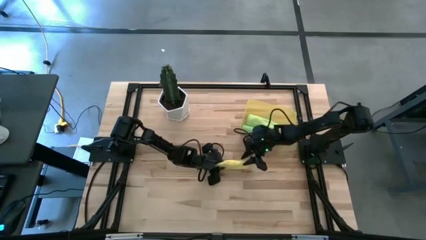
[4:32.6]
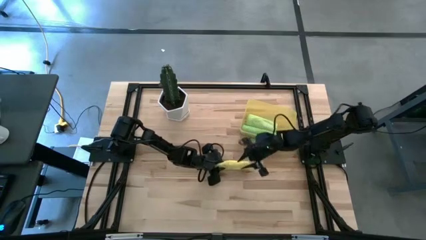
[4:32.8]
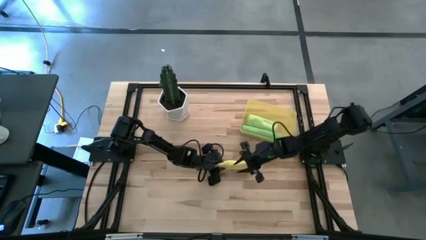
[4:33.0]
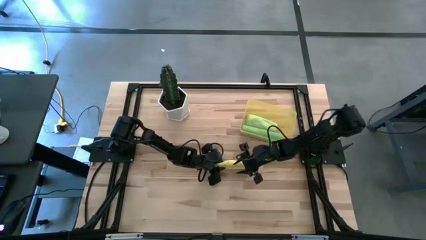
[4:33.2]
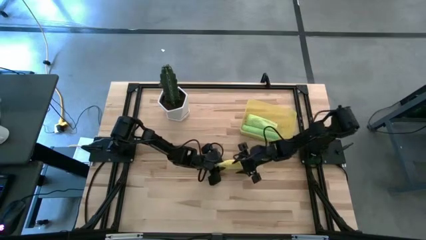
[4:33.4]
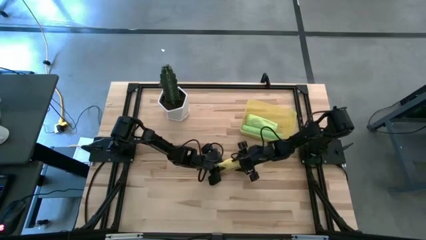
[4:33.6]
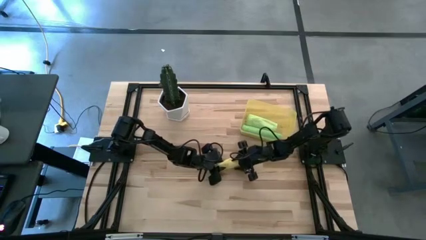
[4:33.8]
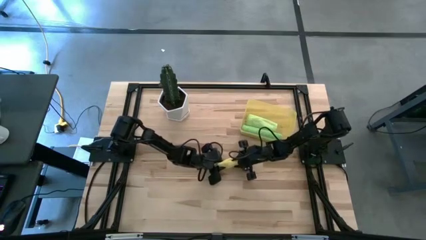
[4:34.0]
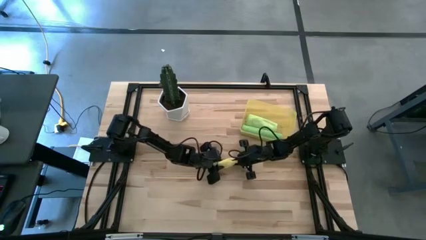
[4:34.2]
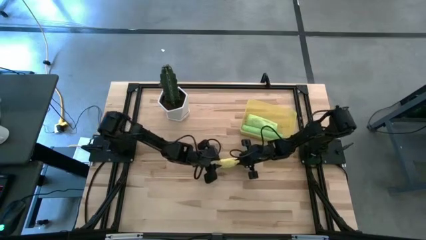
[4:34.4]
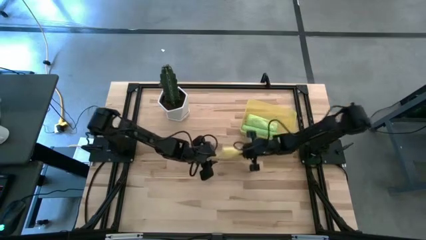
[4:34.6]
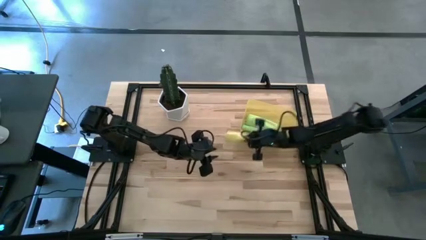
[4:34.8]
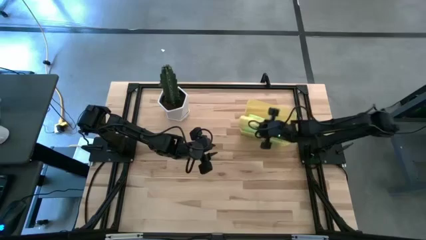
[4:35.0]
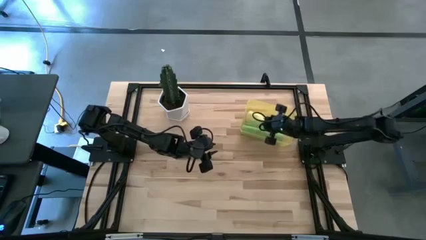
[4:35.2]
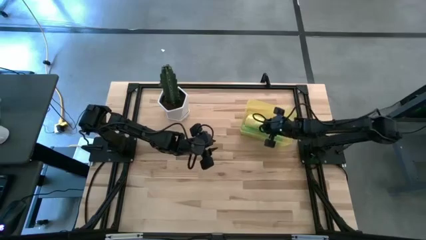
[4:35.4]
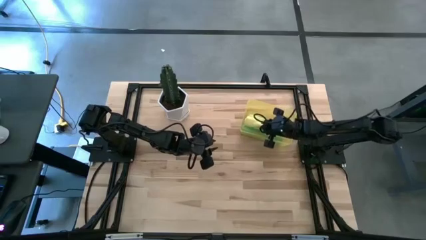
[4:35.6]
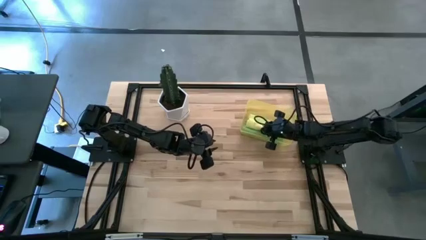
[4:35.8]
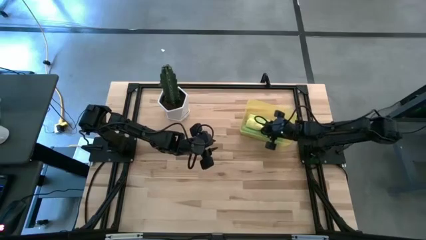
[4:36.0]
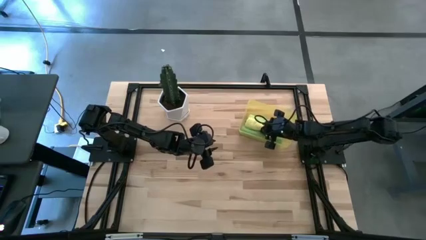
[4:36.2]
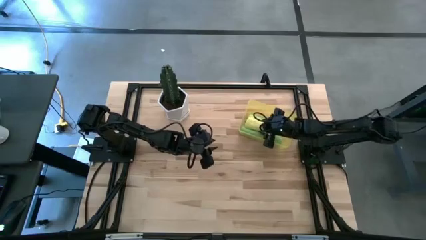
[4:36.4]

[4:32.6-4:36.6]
Task: Roll microfiber towels into tight, uniform cylinder then place into a basket
Put the yellow microfiber cloth into the yellow bin

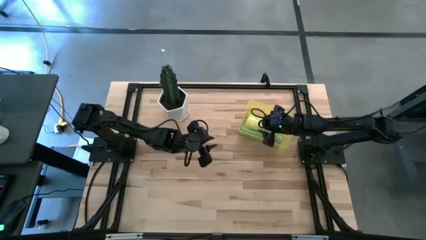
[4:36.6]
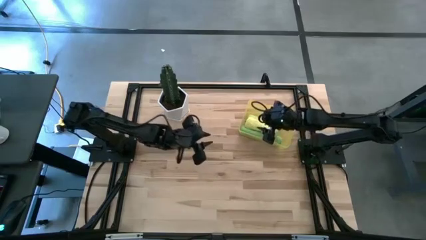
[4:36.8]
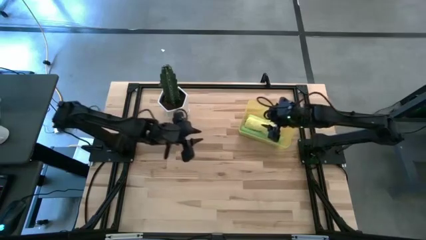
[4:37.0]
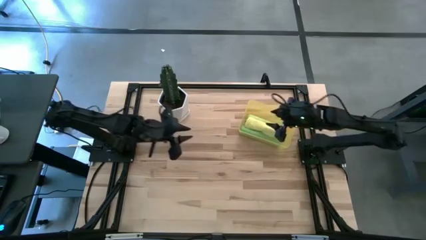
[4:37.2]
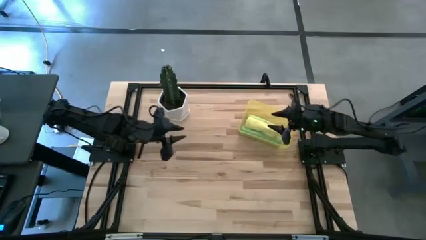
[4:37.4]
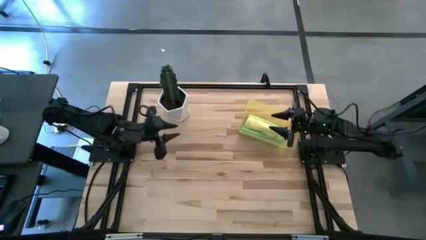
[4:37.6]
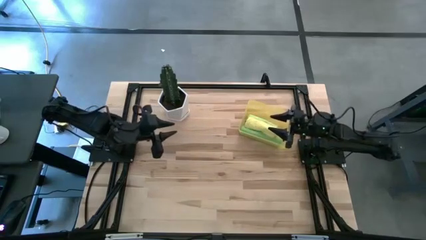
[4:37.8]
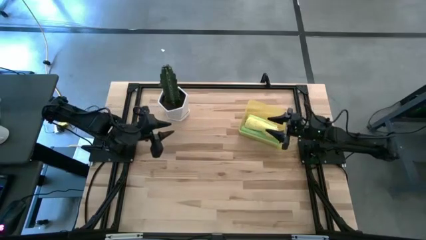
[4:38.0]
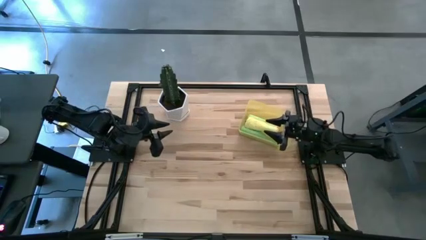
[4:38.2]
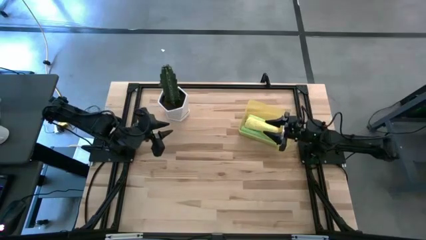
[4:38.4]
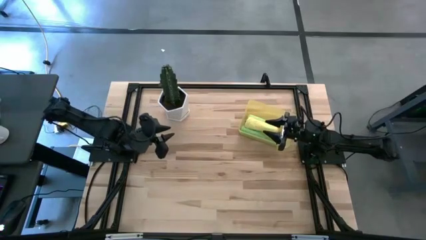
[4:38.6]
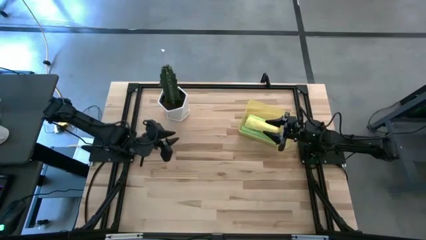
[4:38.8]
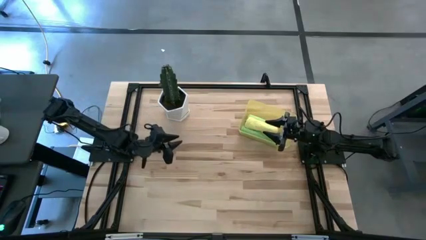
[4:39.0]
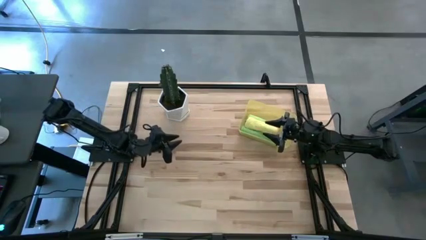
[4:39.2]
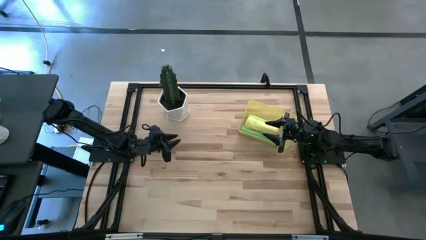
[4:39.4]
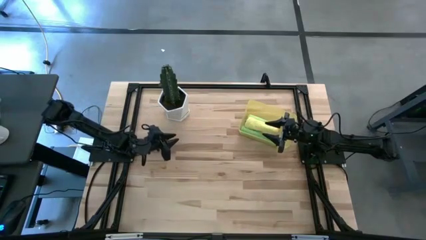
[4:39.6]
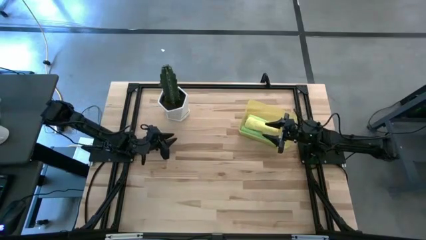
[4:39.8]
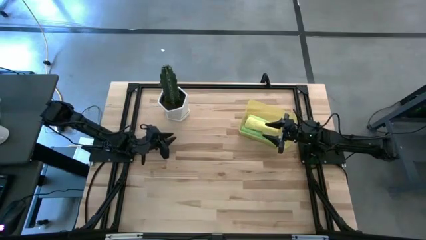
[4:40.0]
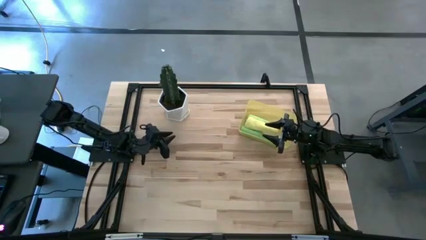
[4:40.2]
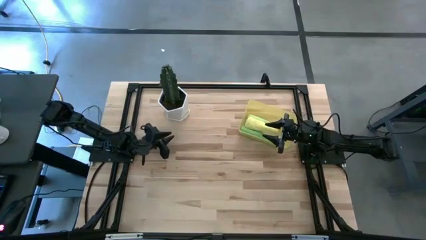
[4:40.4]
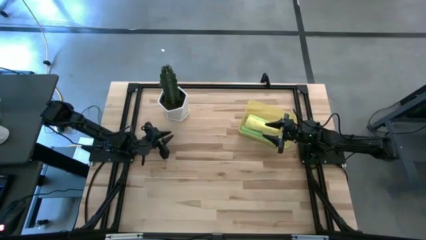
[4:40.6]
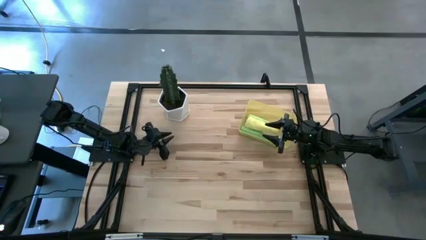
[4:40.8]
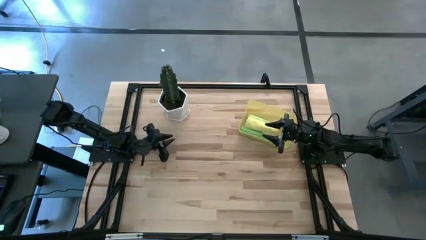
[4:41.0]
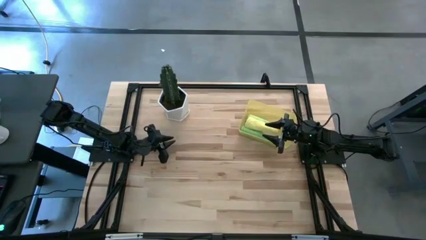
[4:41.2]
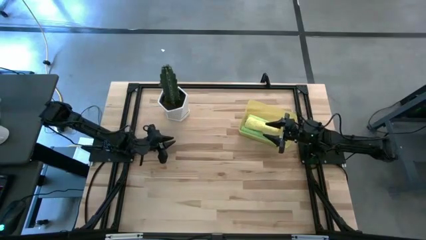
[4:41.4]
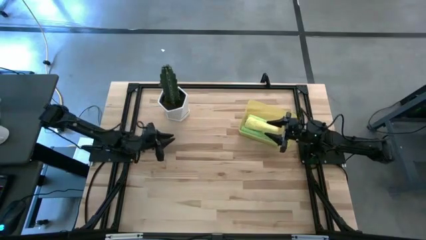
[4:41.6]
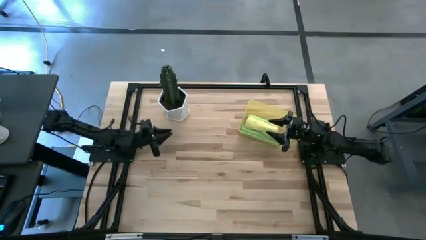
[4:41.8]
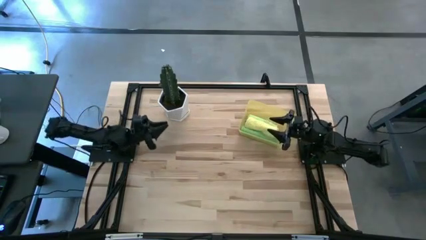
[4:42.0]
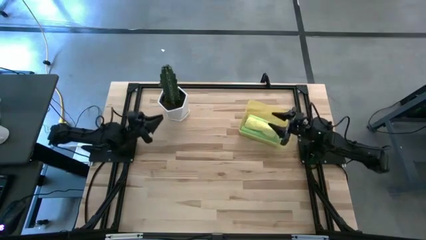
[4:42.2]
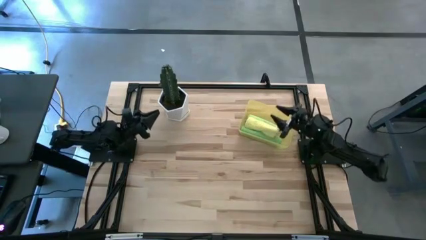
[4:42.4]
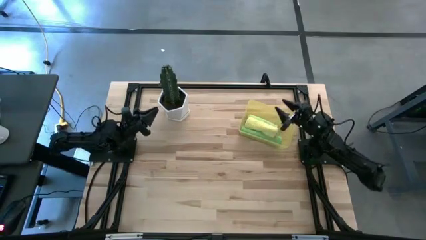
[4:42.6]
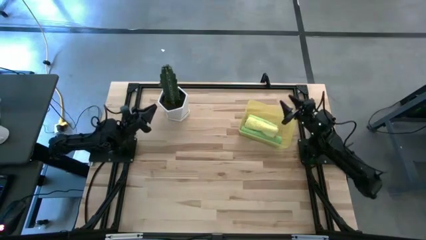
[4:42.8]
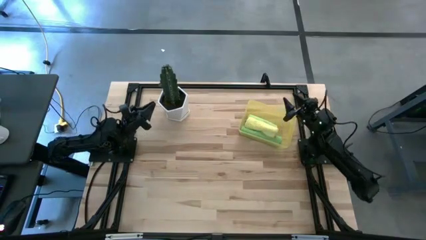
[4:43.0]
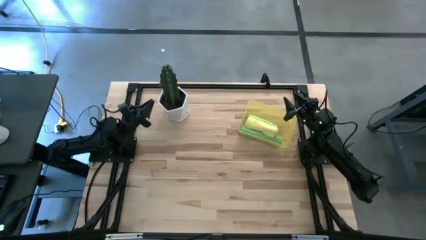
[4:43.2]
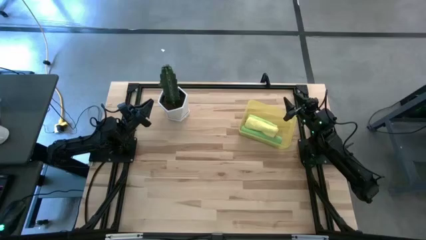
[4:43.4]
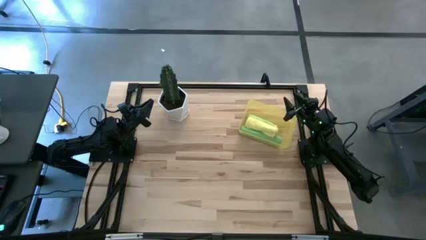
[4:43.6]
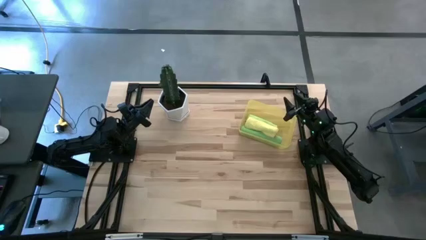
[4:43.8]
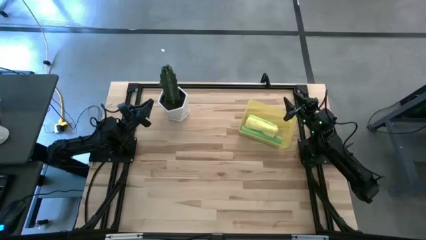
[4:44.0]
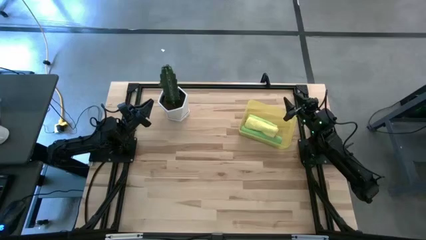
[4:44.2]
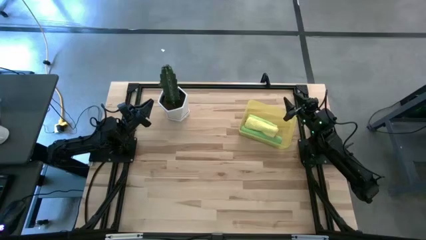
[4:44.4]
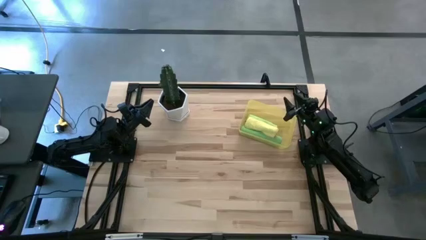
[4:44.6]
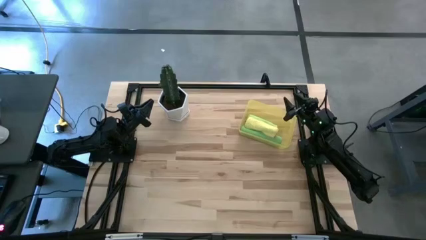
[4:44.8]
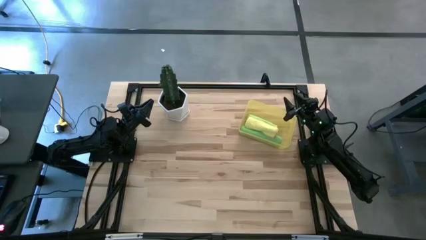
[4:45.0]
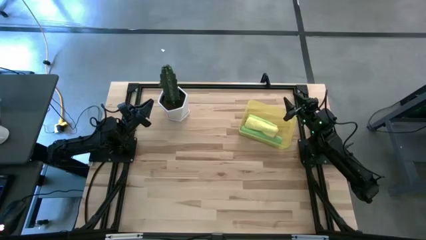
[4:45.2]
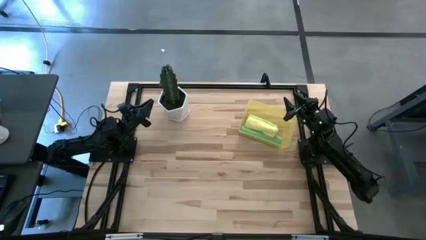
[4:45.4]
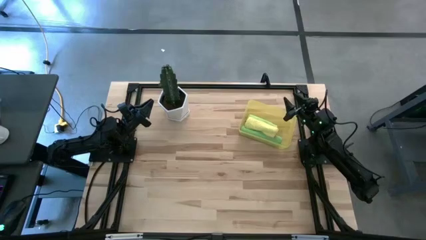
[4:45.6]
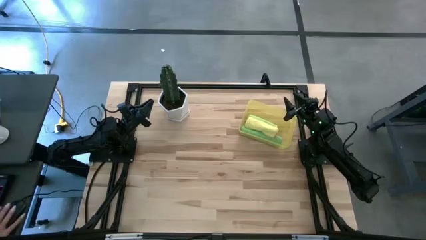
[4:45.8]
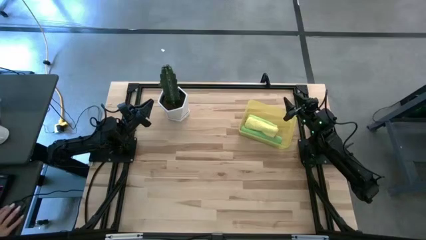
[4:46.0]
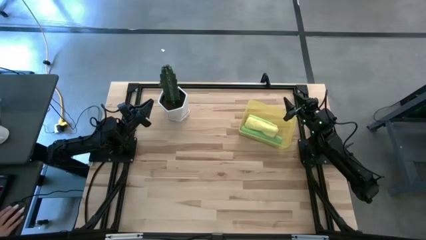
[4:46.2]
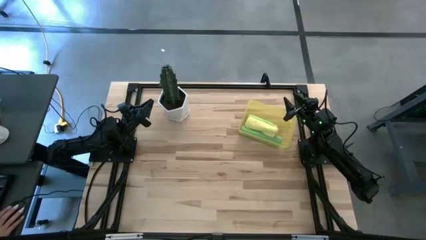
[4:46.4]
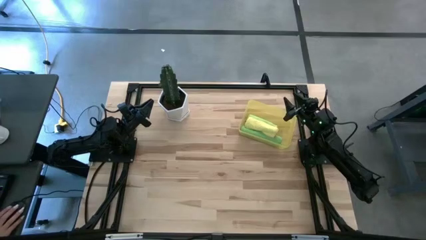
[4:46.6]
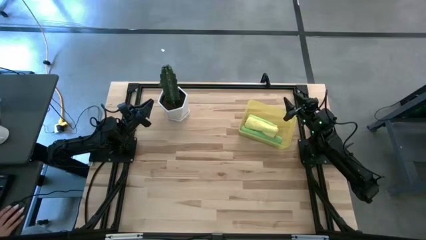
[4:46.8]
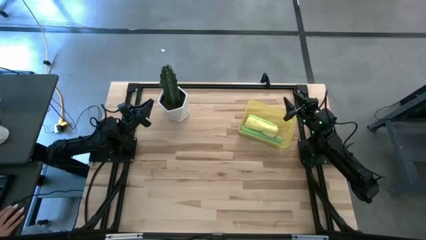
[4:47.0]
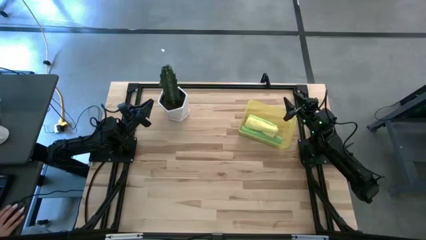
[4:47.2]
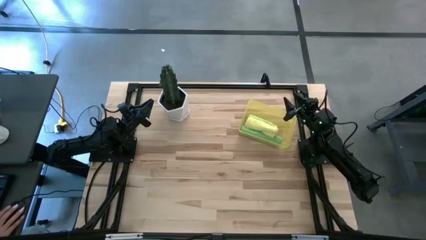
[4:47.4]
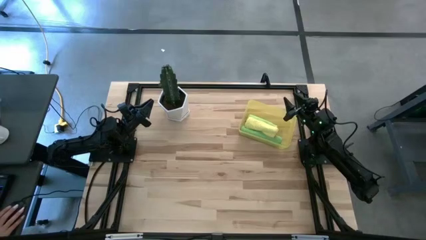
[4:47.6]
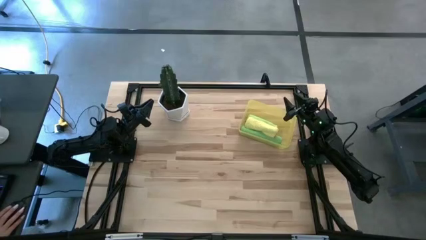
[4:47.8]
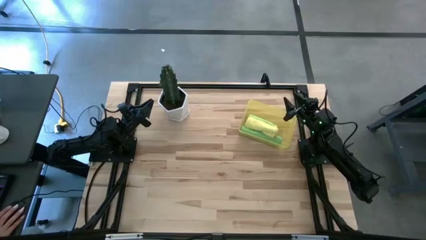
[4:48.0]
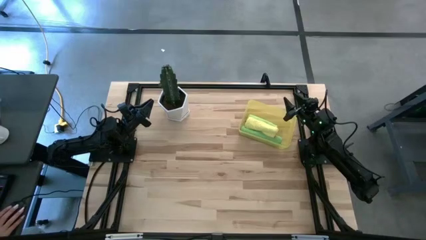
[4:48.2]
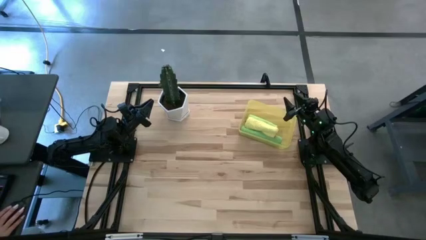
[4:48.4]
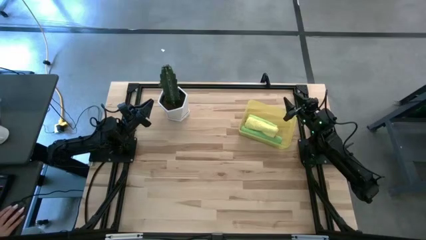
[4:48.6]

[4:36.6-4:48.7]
Return to Home Position
